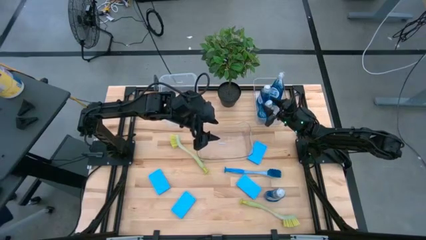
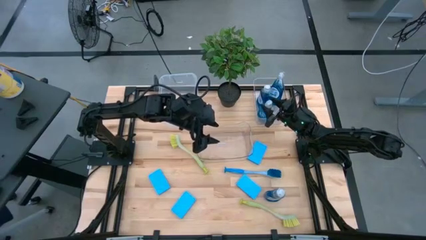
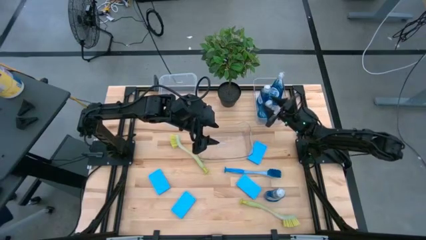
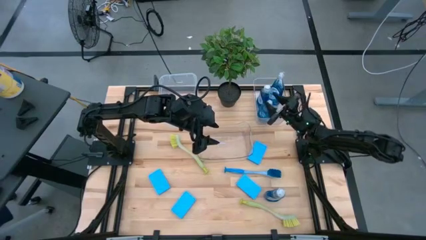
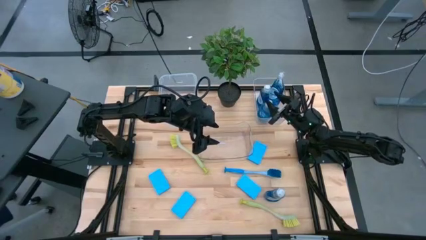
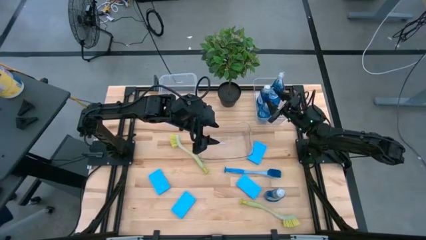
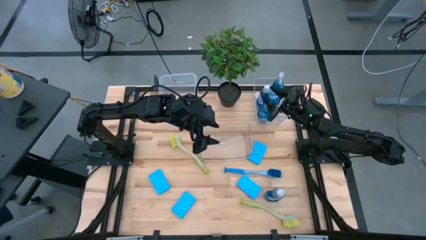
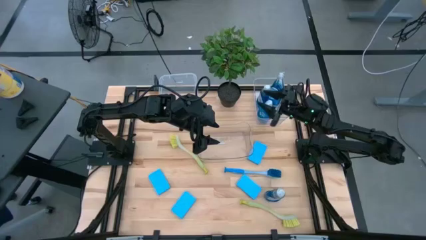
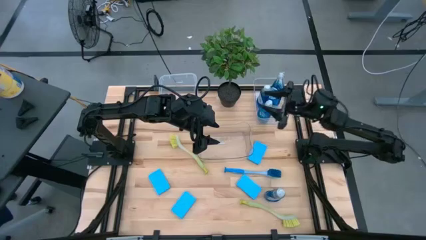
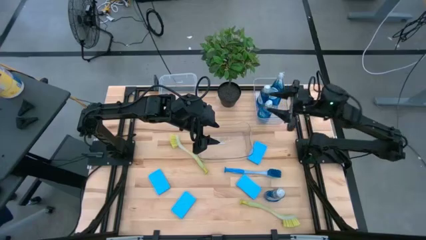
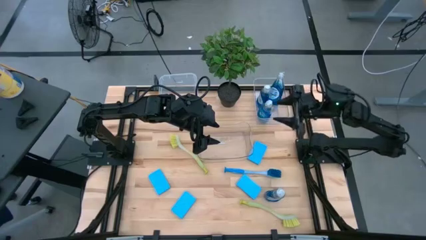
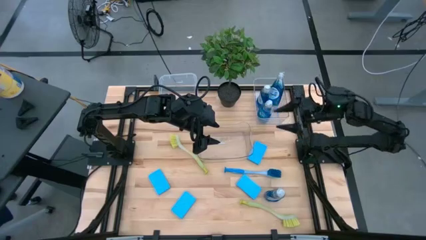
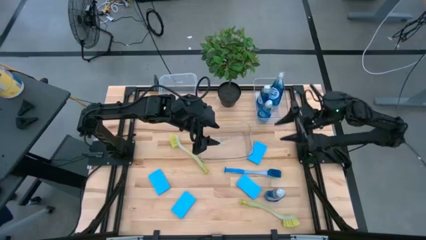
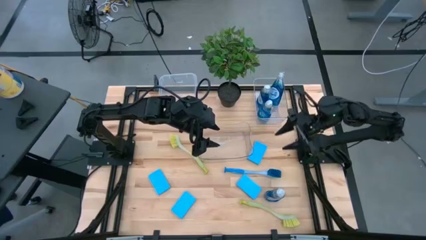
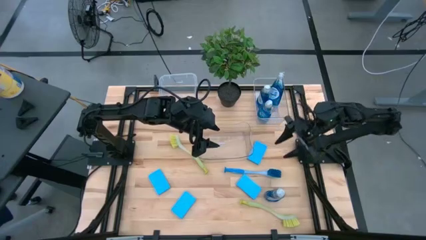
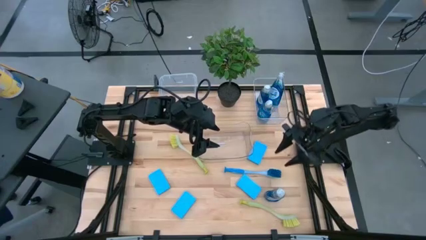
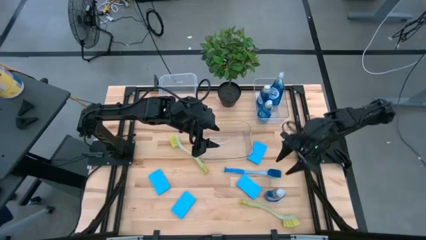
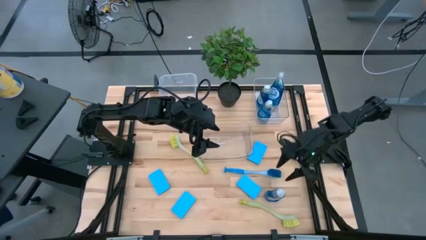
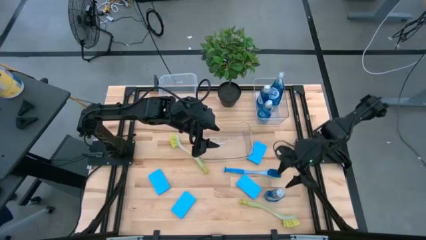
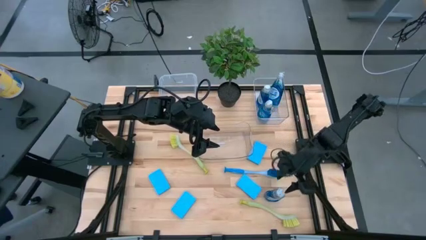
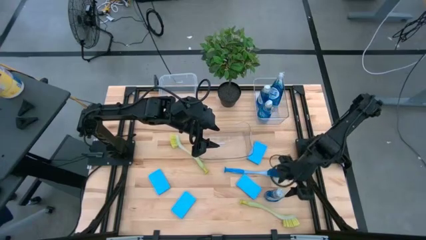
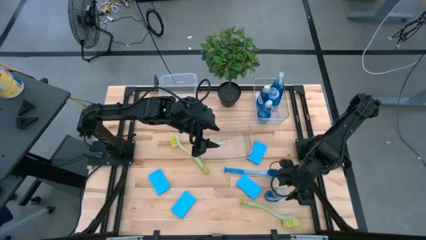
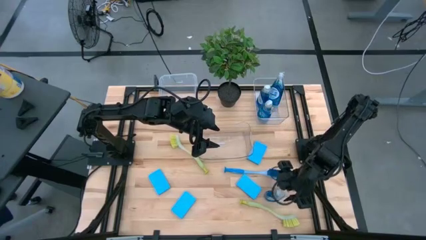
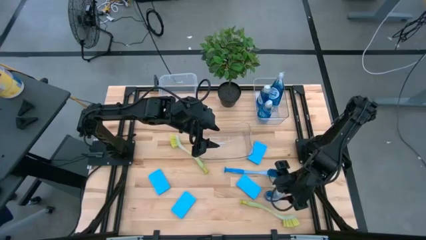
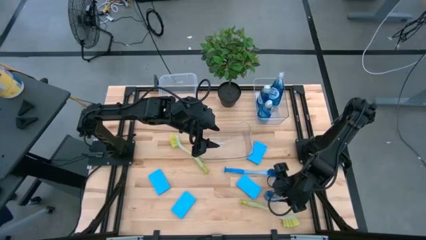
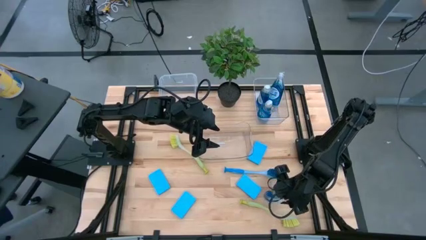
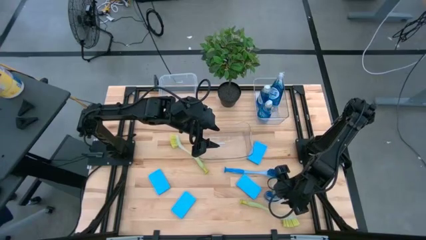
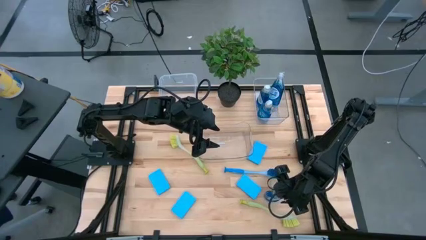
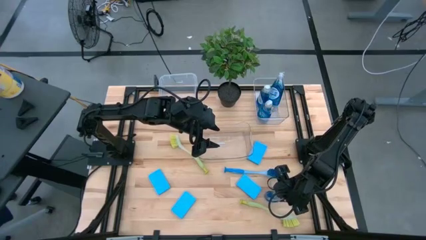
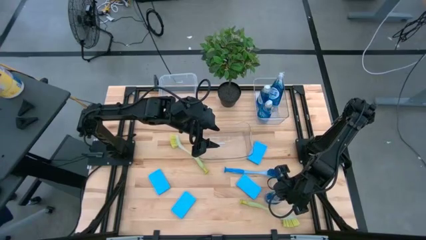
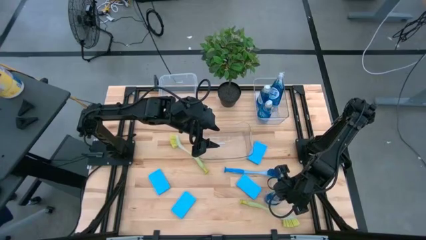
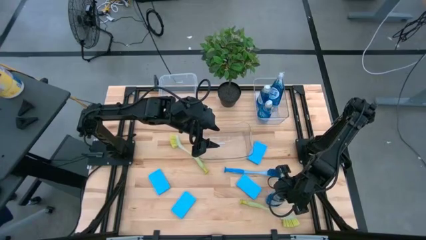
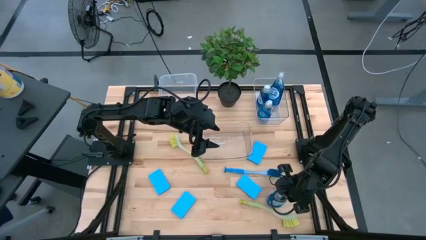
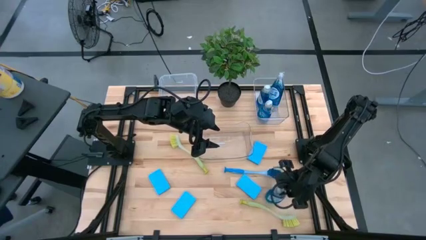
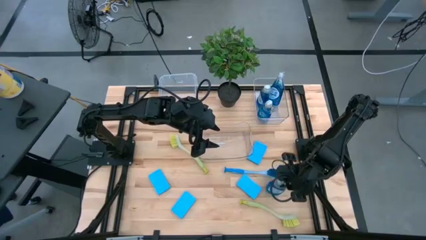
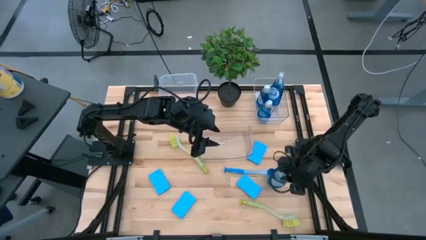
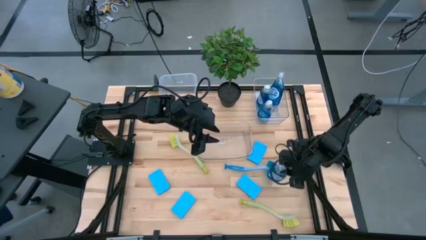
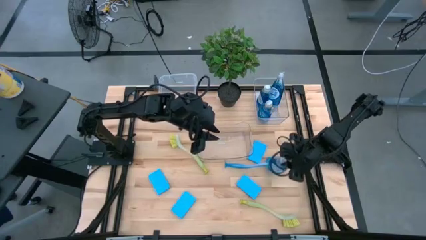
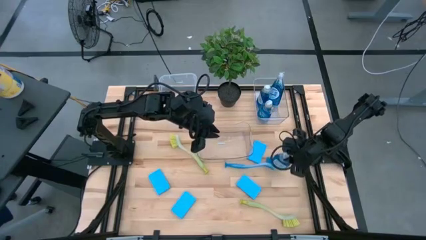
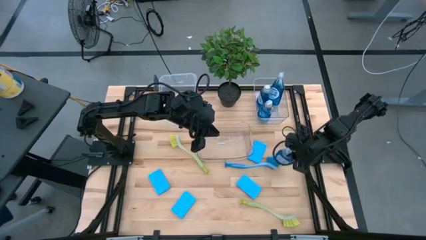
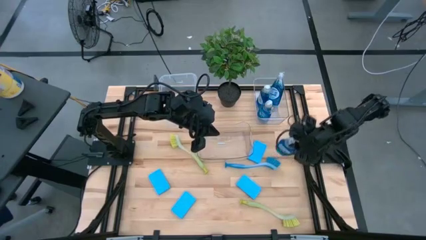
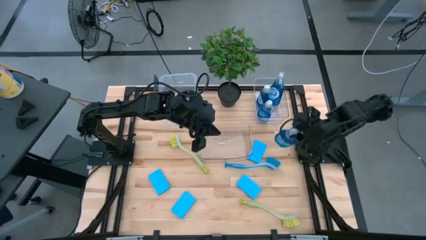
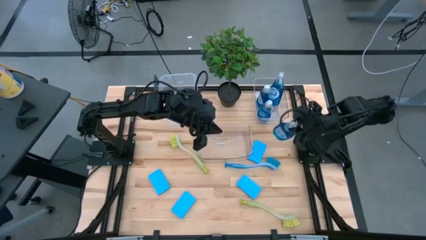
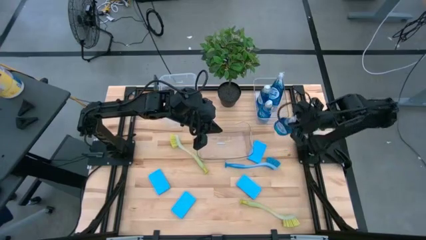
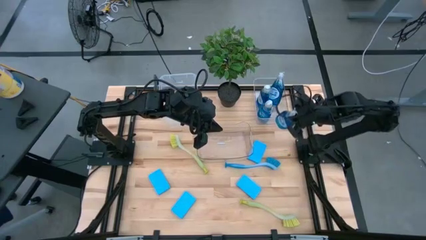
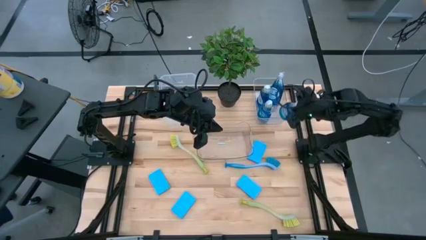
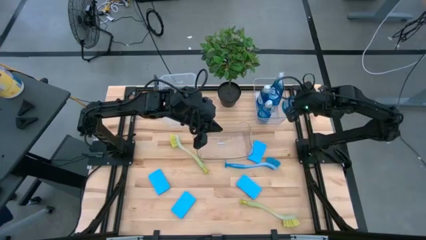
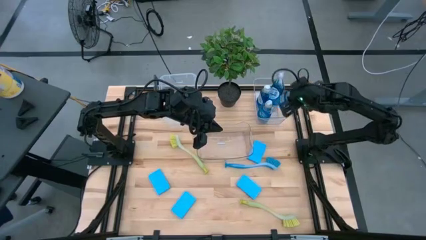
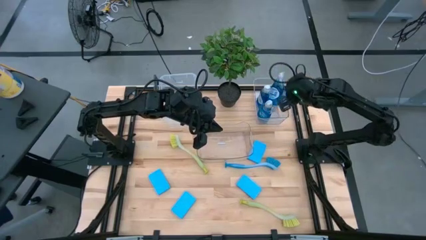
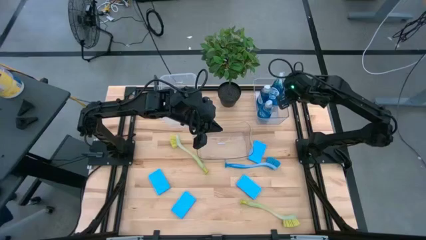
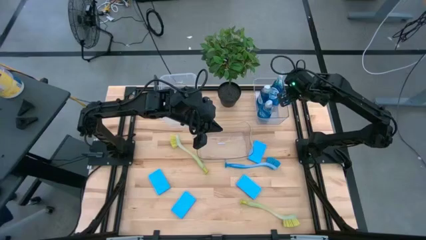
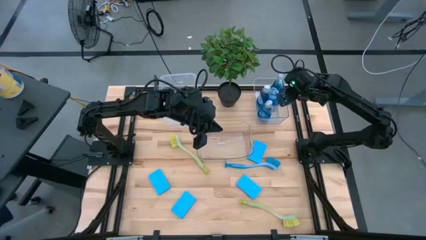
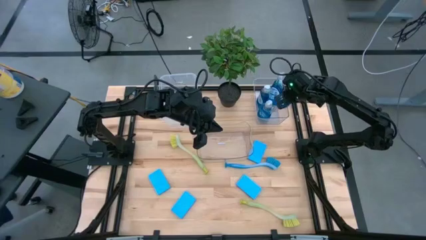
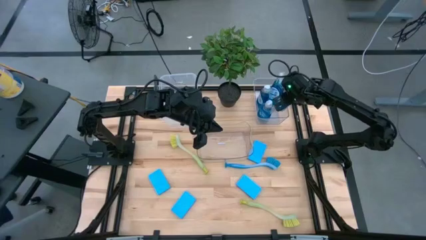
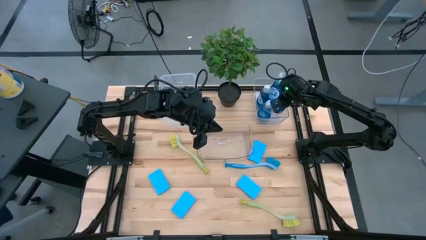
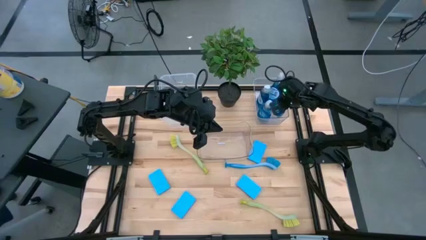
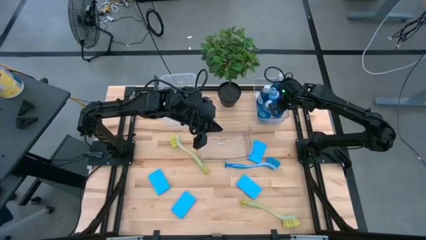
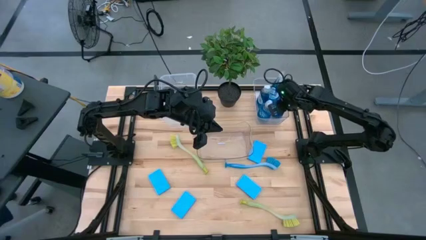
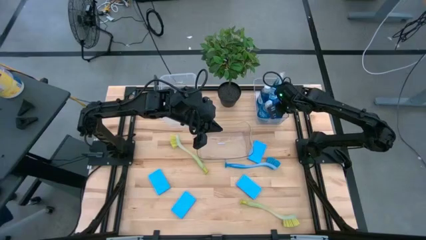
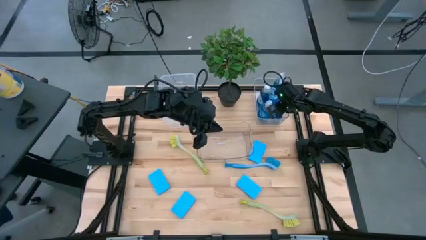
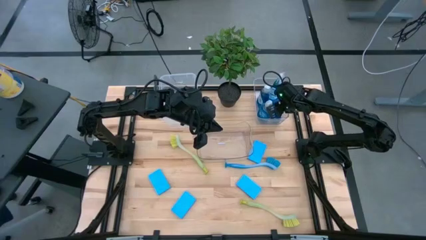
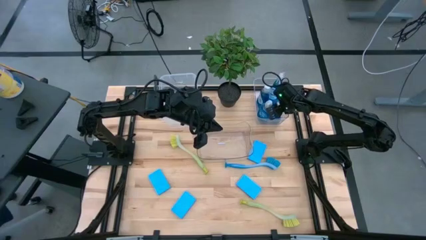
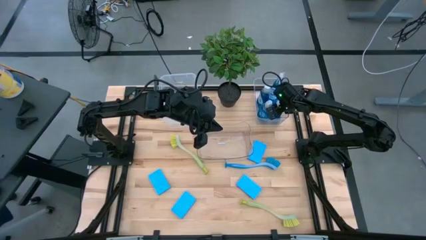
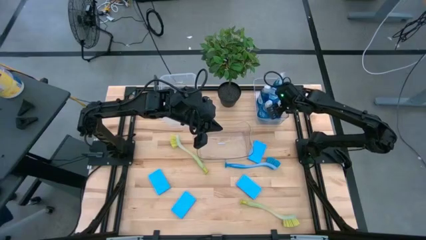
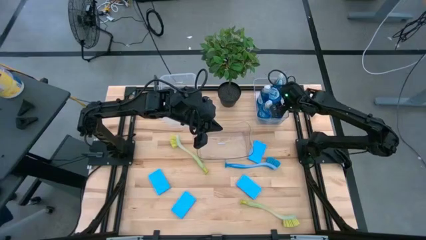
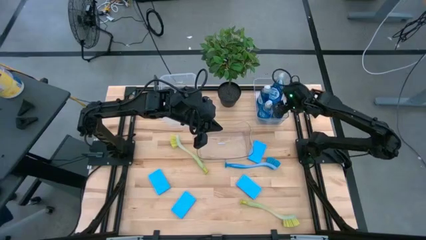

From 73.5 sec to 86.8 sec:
Task: Pick & Place Kitchen Sink Supplies
Put the dish soap into the top transparent bin

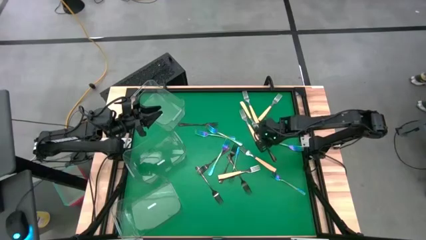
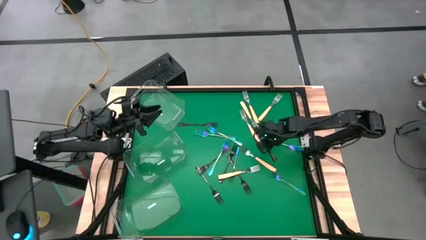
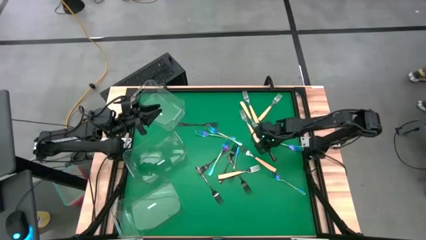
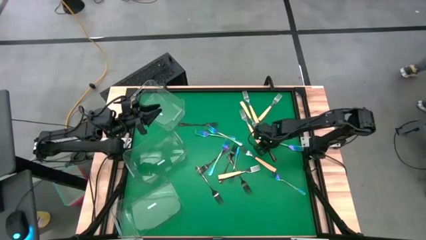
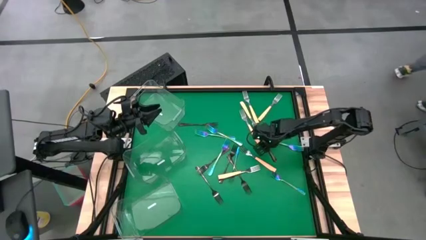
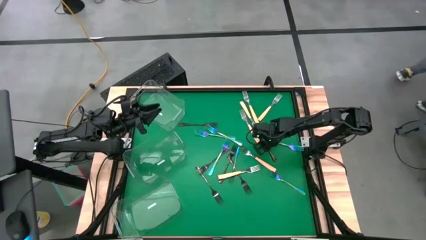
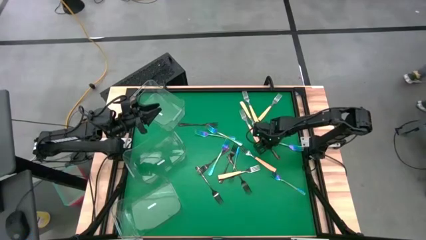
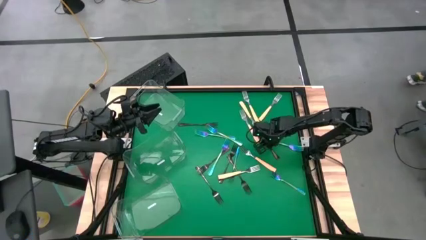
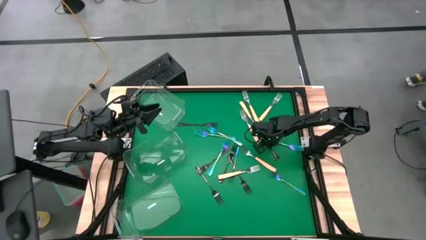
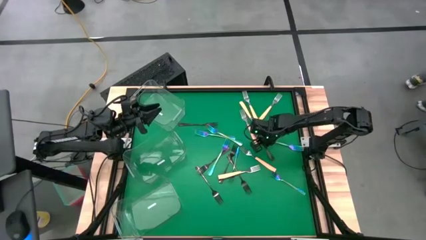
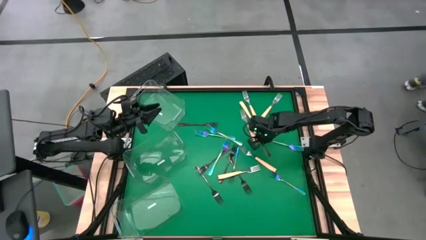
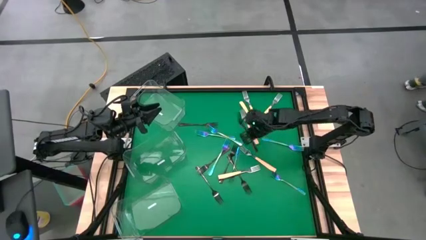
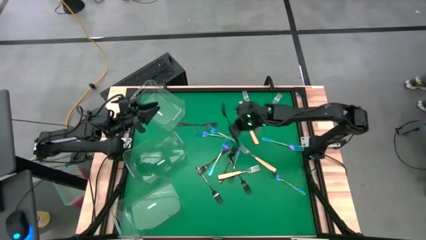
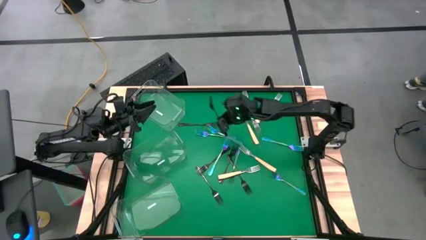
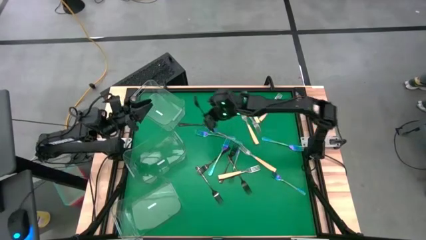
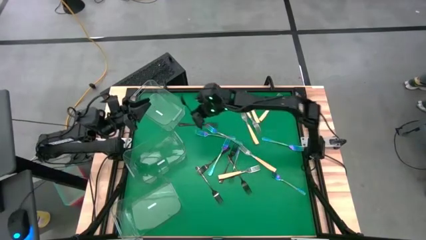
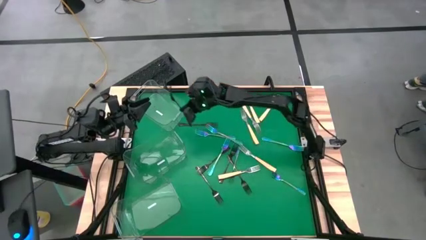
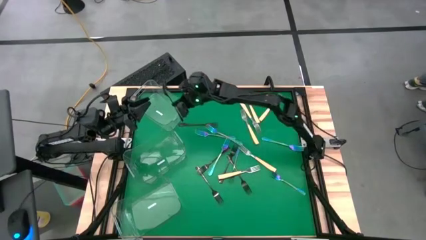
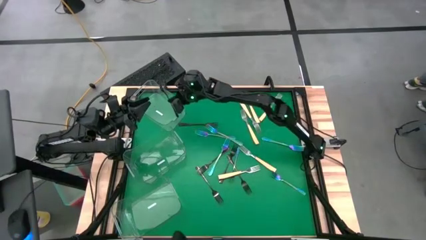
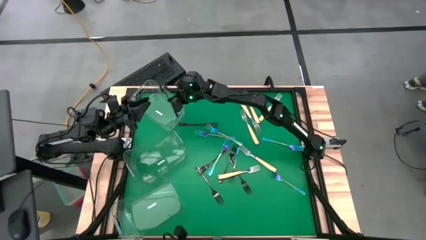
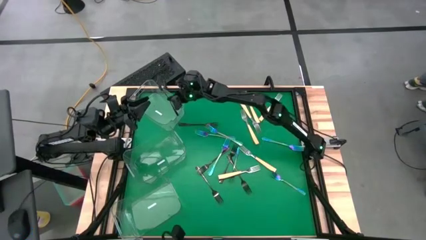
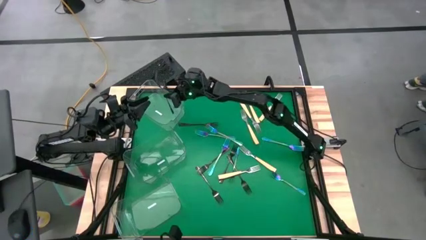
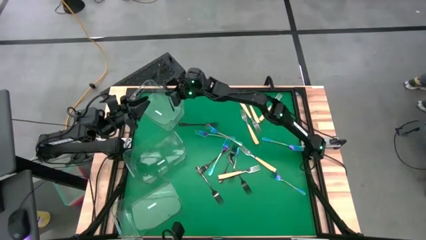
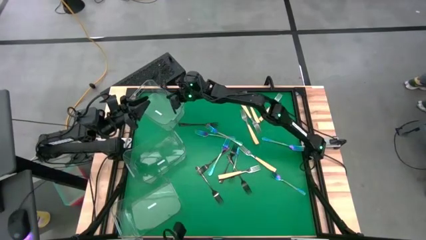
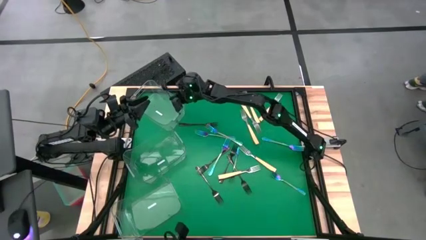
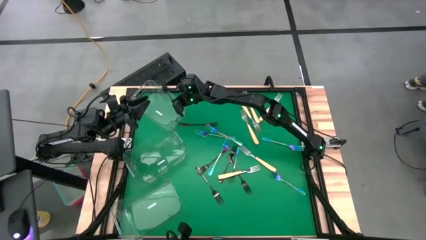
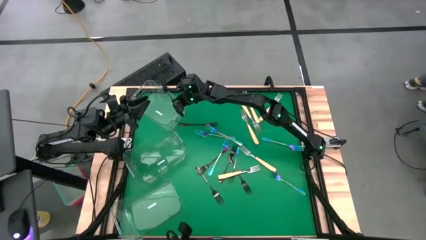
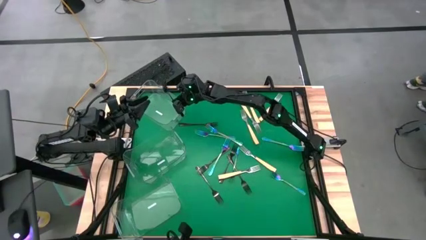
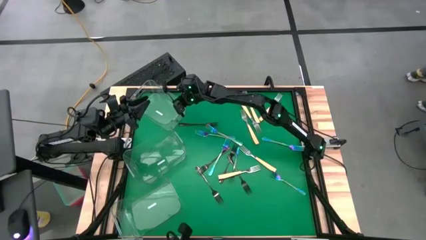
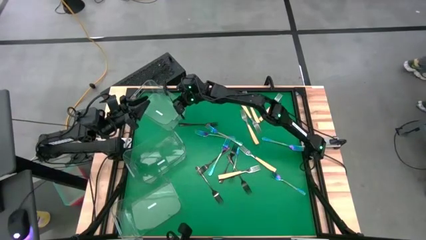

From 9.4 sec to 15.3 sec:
Task: Sort silverware by color (type)
Put the black fork into the top transparent bin
